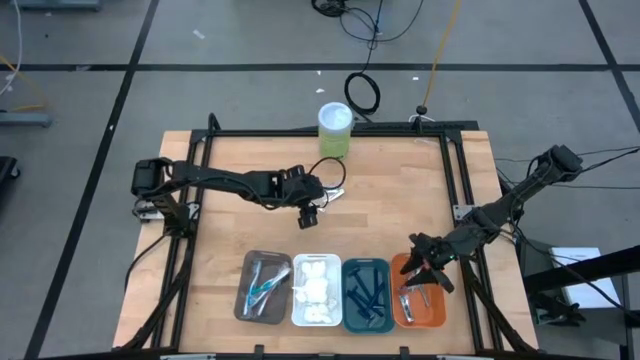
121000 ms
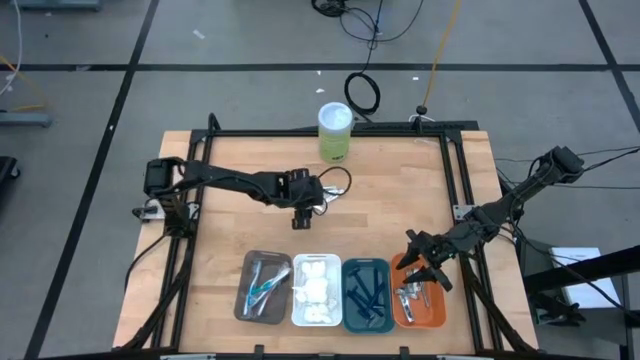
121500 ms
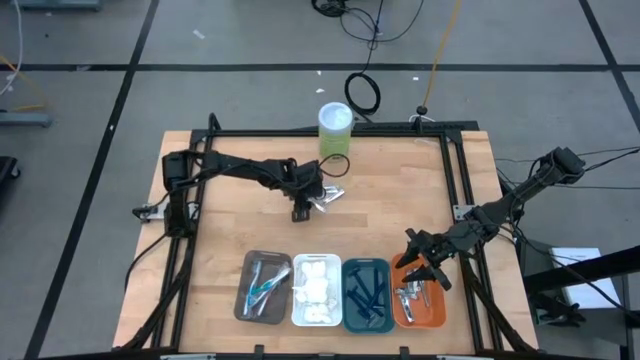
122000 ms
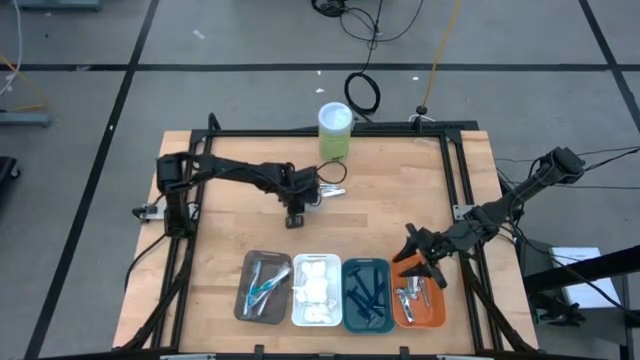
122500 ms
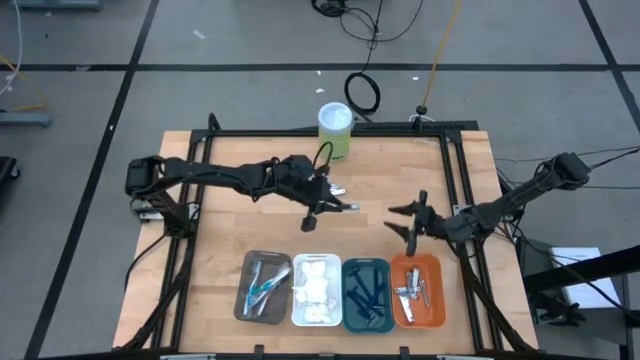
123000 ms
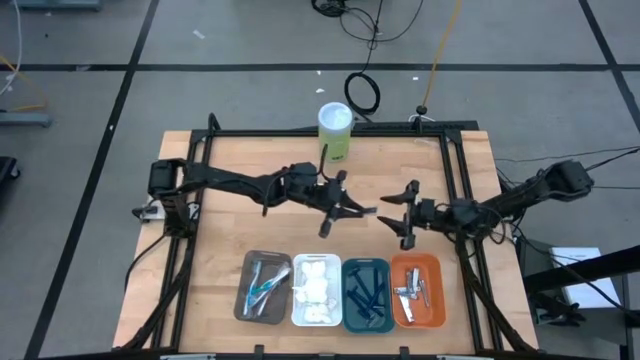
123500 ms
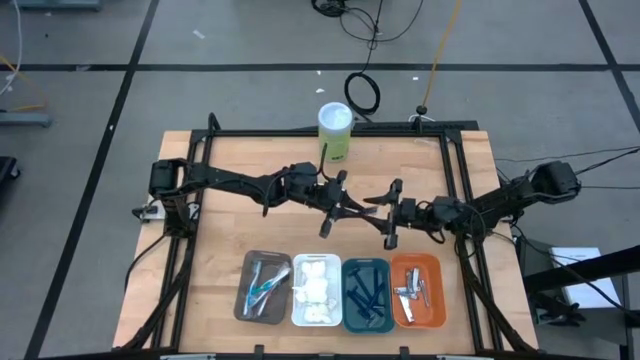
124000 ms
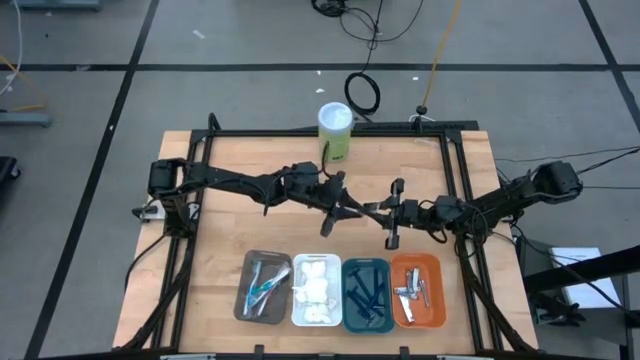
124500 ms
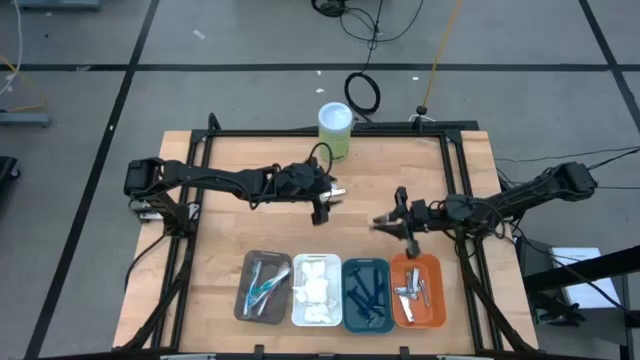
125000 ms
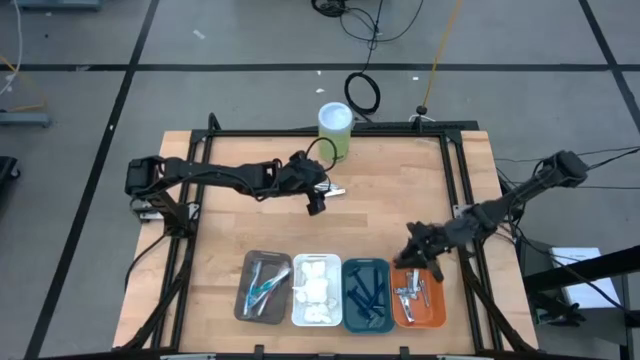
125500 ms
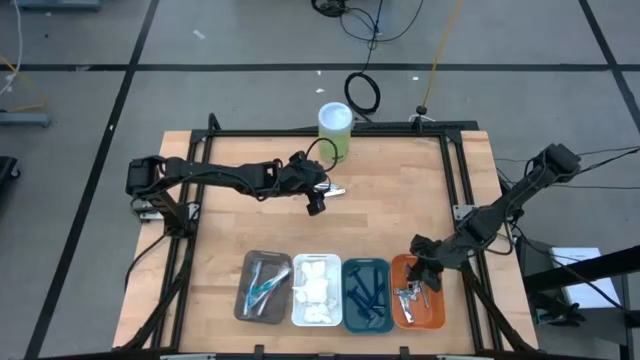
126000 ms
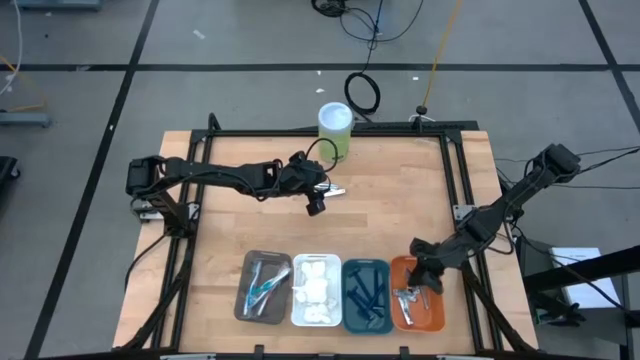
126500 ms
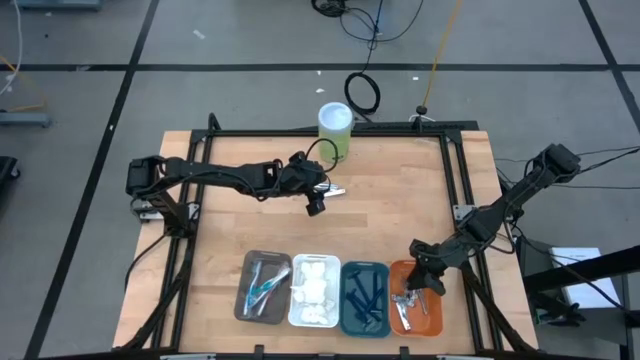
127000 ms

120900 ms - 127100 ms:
Task: Pick & Place Travel size toiletries
Put the silver nail cutter into the orange bin

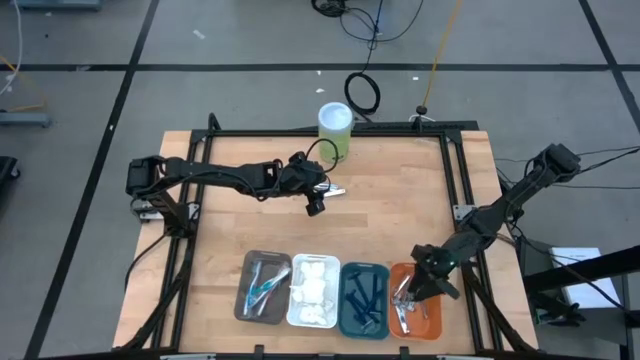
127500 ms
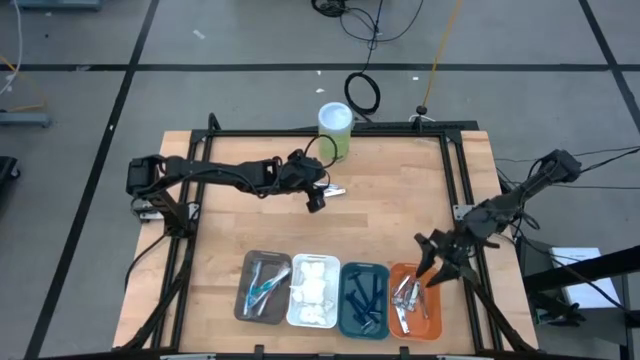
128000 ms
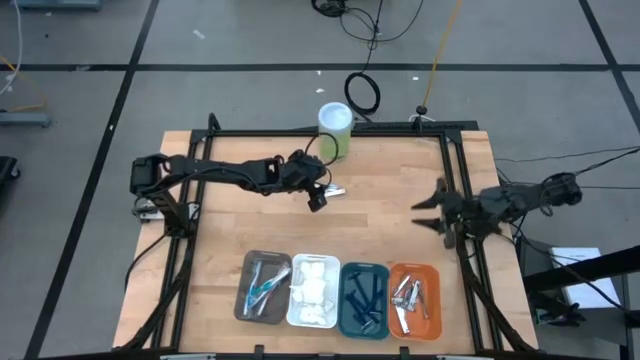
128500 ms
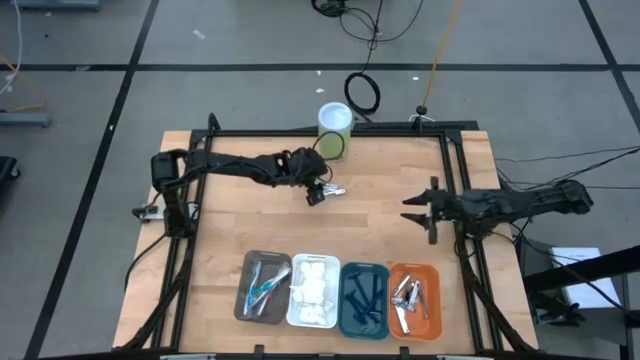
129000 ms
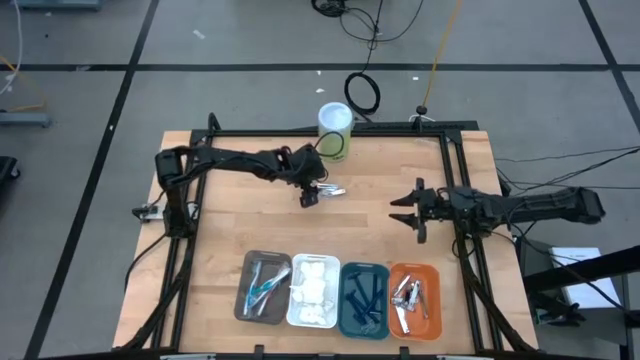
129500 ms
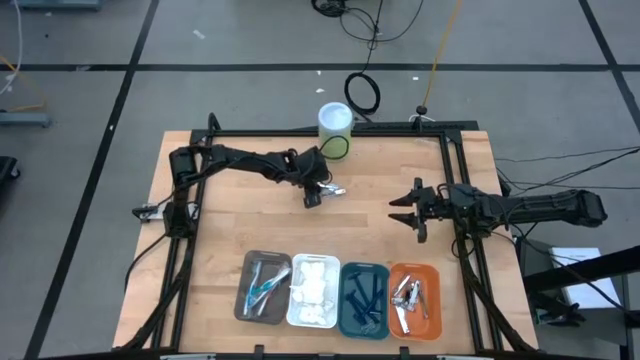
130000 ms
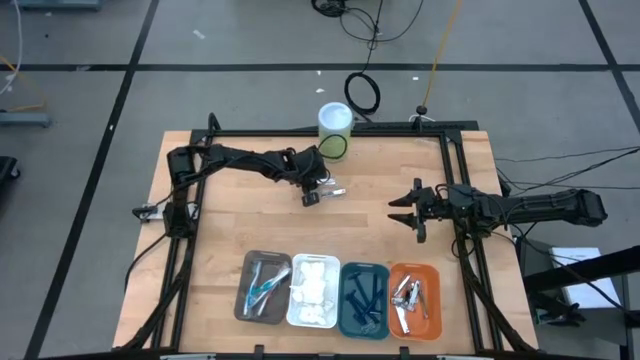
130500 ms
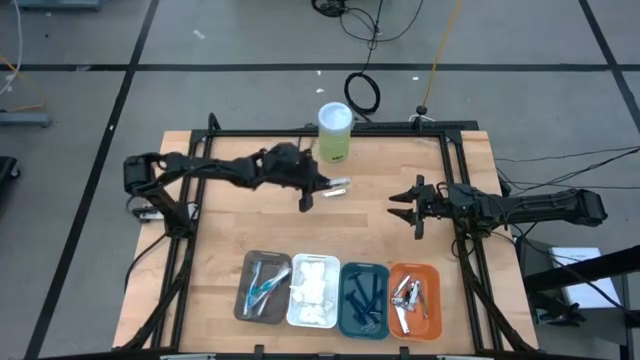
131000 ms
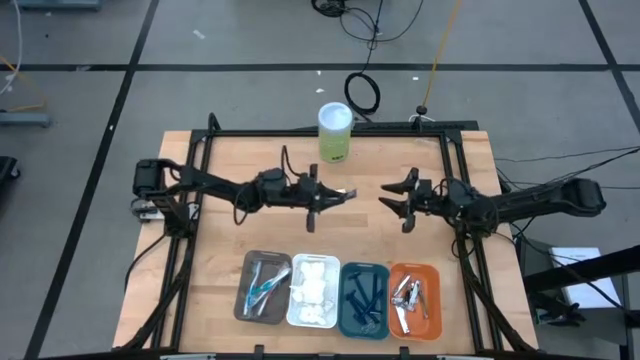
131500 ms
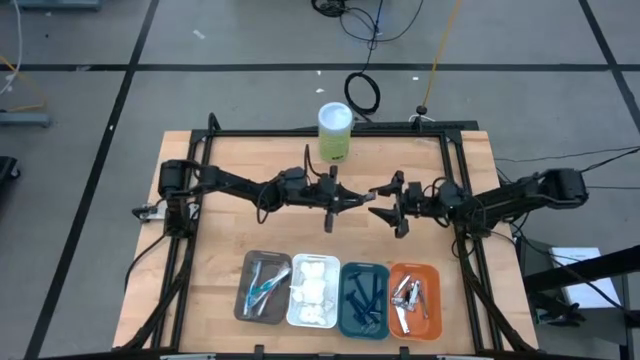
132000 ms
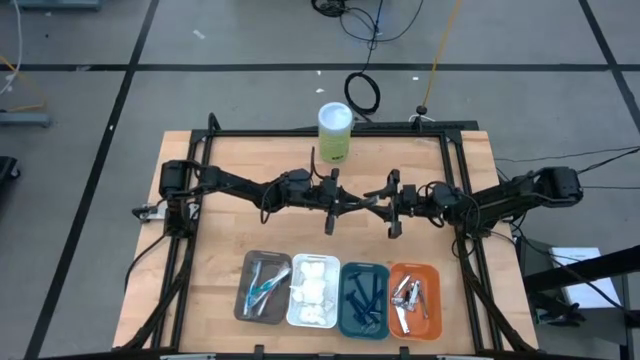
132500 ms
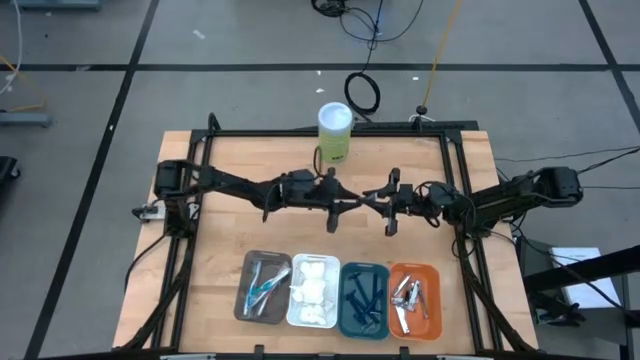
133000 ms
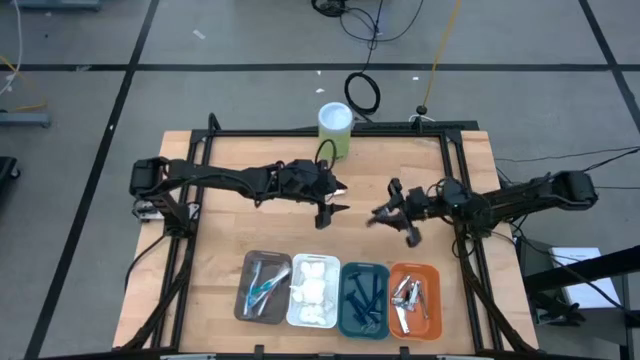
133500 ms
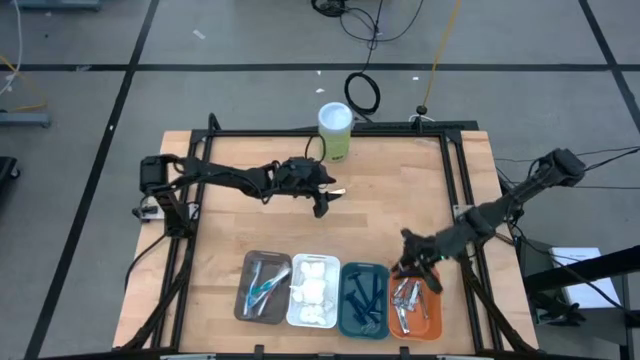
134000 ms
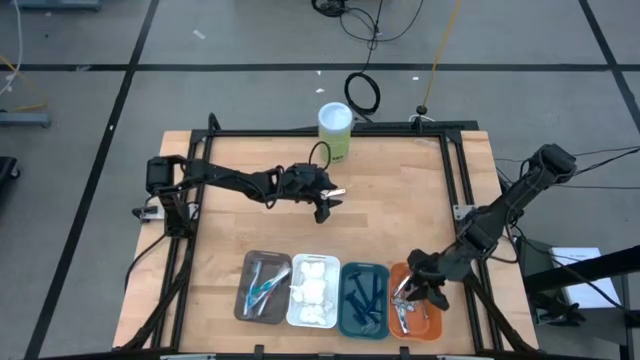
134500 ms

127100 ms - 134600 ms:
Put the silver nail cutter into the orange bin

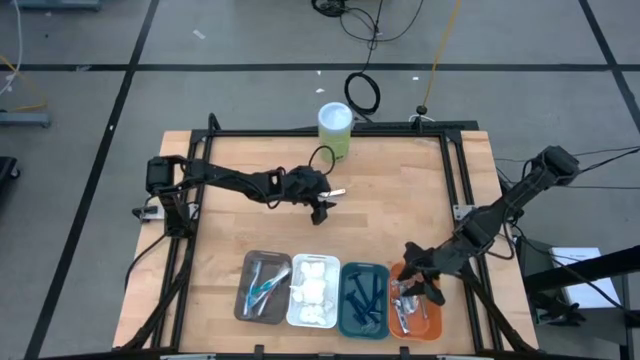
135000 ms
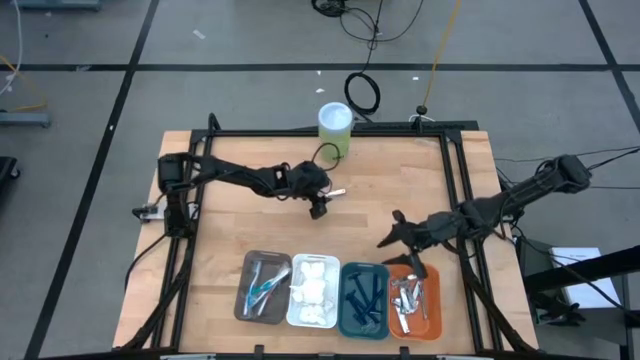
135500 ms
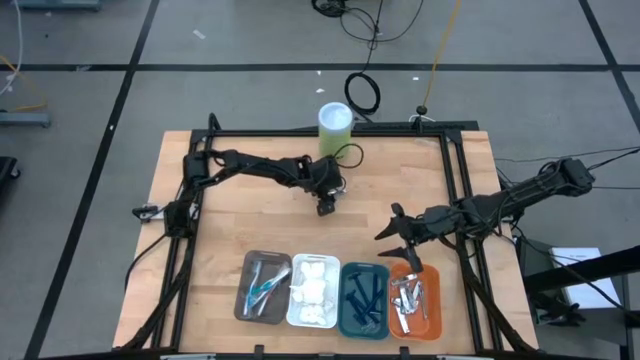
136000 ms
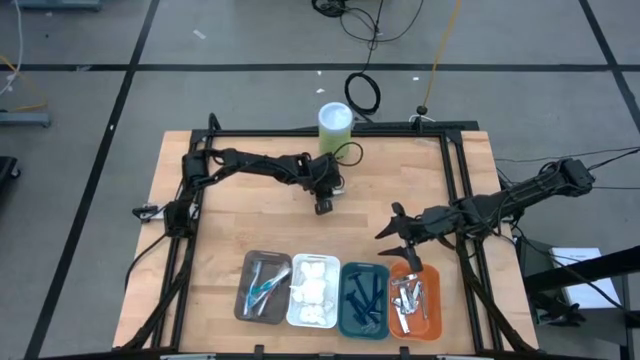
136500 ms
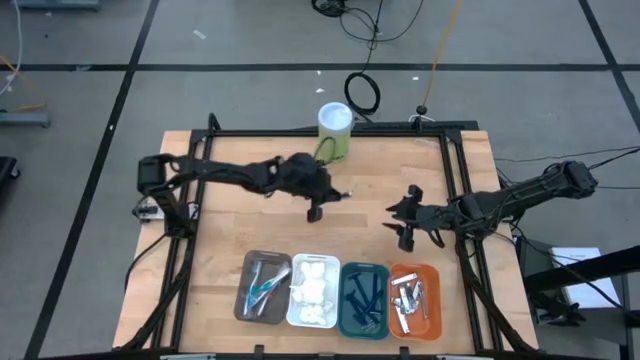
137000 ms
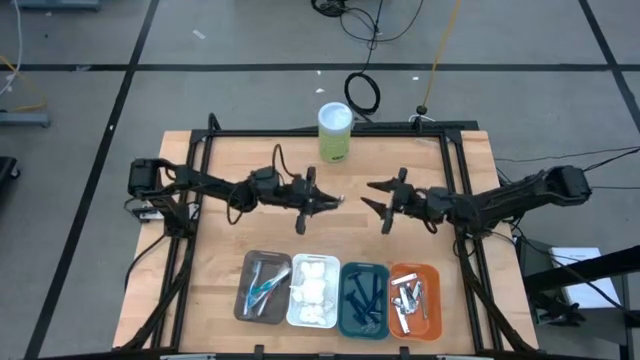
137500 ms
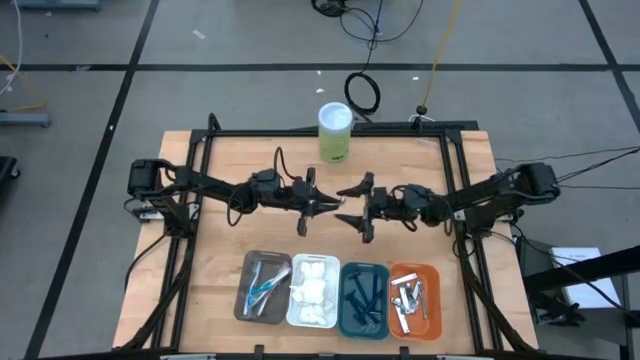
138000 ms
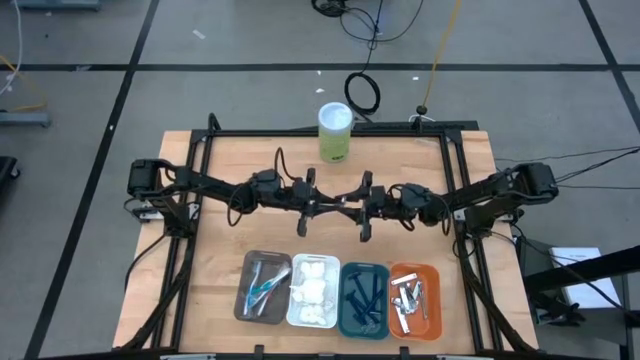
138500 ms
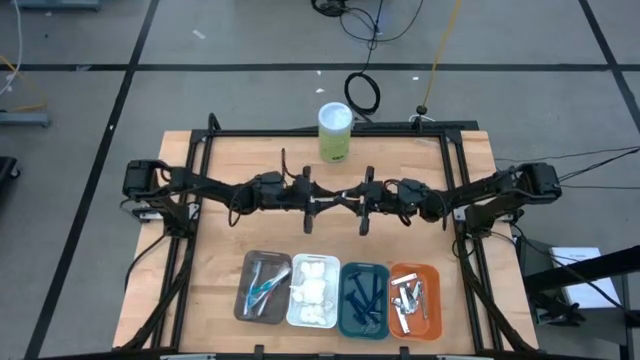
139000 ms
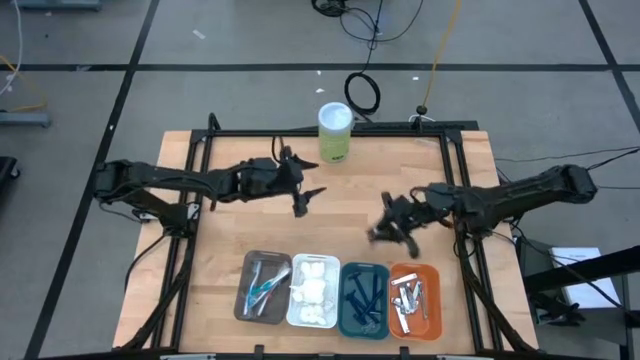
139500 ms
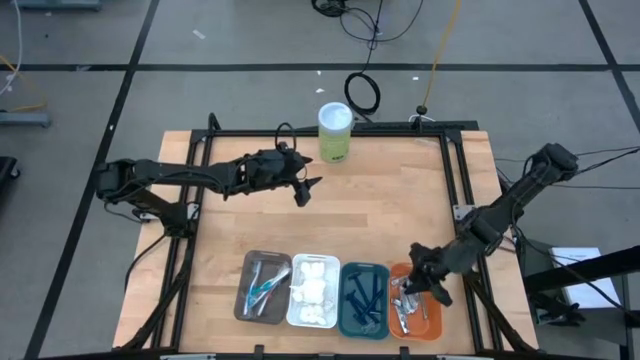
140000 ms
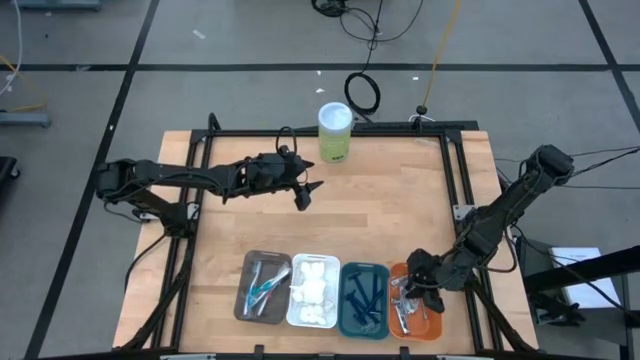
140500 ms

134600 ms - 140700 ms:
Put the silver nail cutter into the orange bin

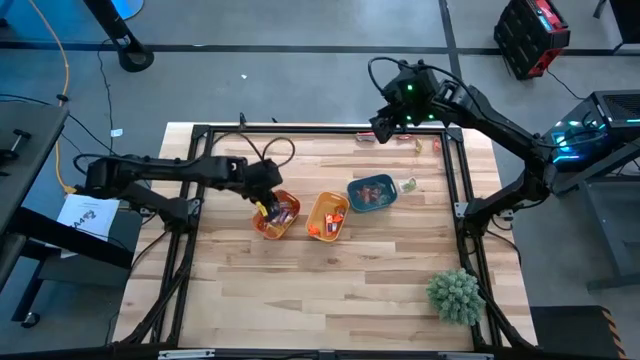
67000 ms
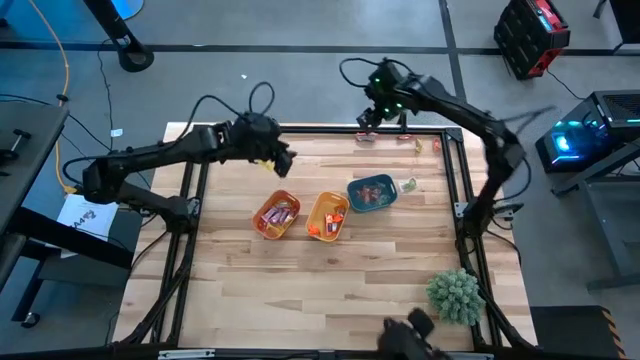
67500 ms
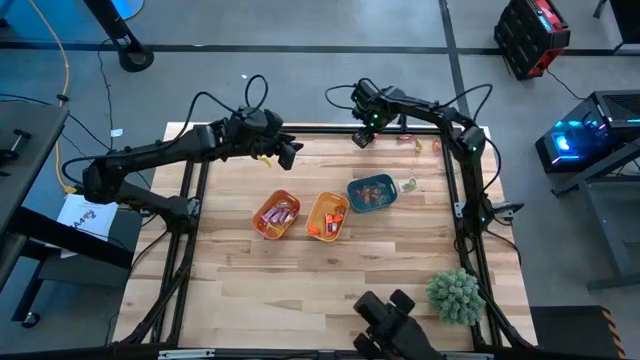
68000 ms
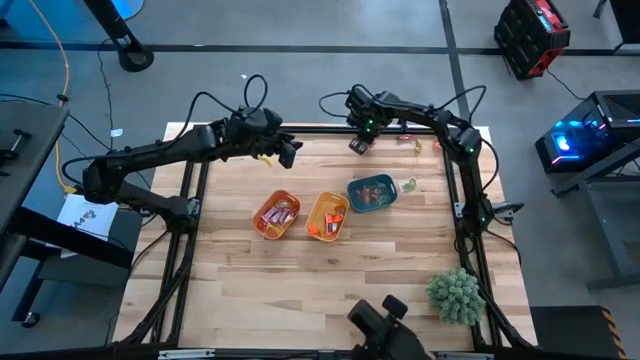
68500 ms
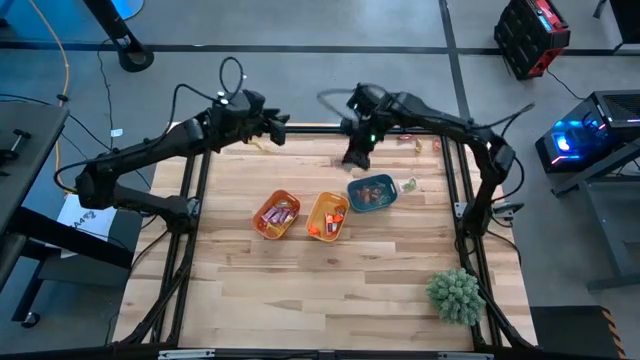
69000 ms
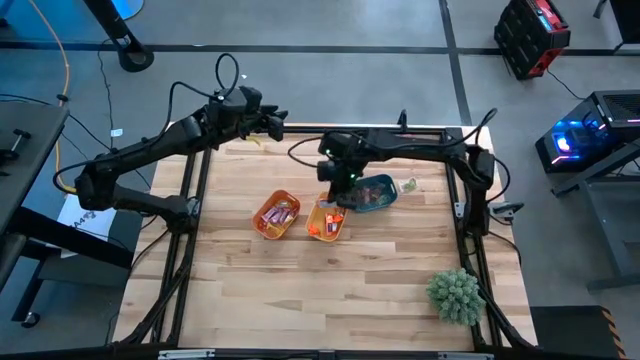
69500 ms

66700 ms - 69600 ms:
Task: Sort candy
Put the orange chocolate into the yellow bin
